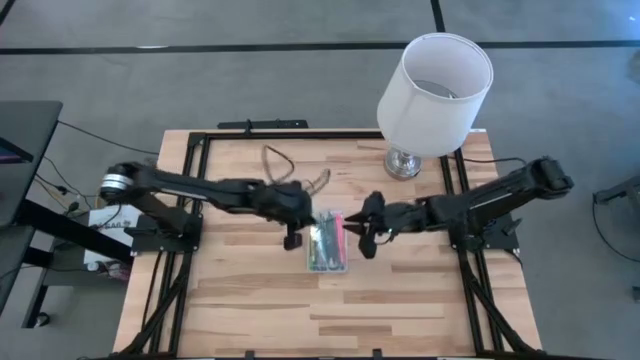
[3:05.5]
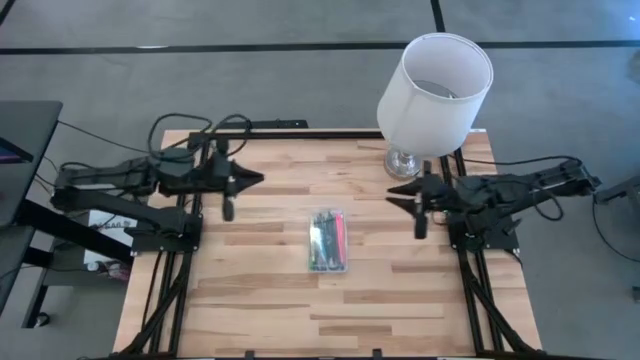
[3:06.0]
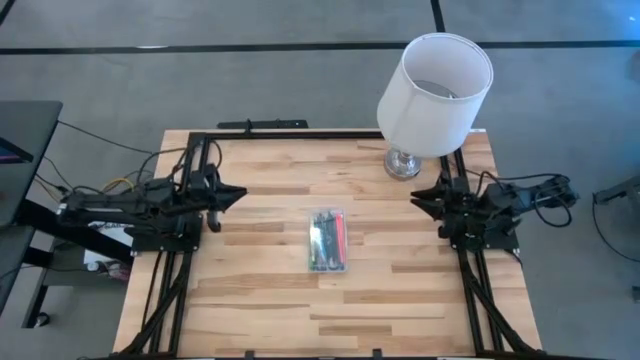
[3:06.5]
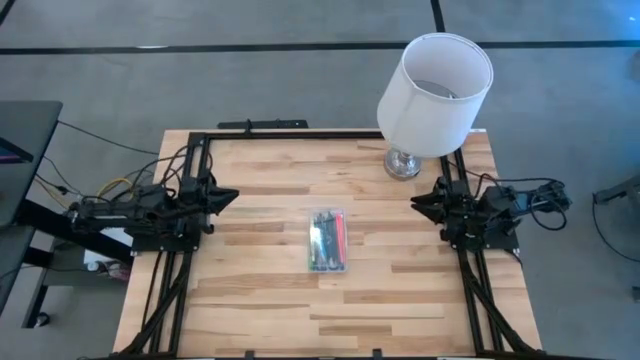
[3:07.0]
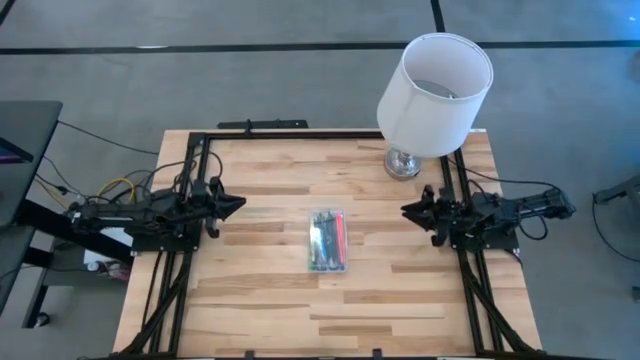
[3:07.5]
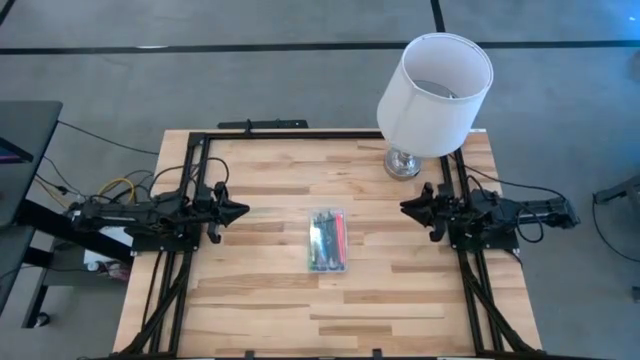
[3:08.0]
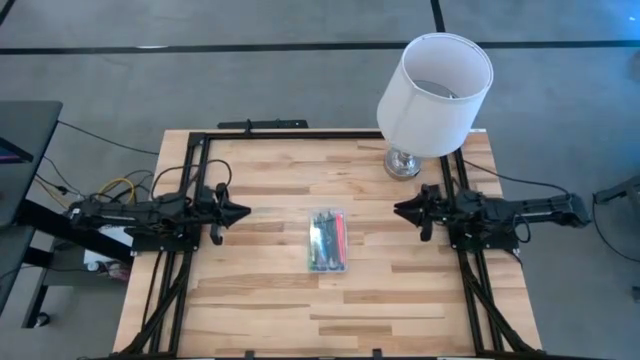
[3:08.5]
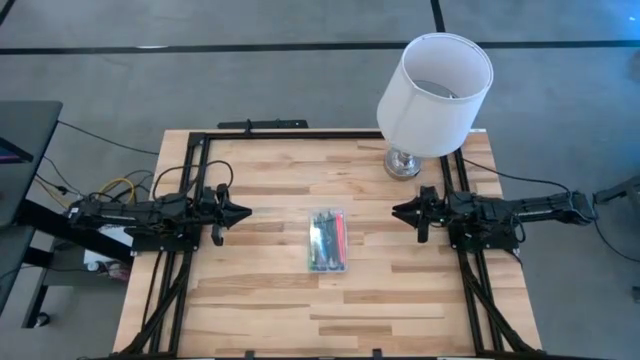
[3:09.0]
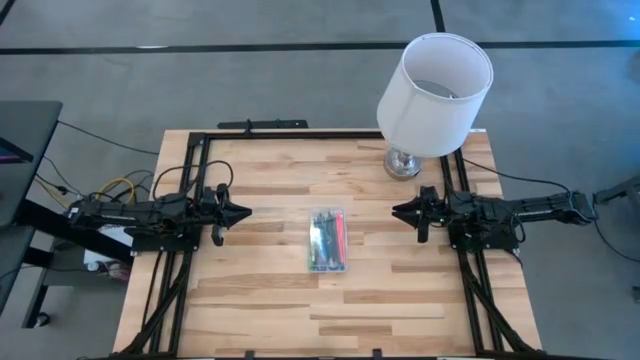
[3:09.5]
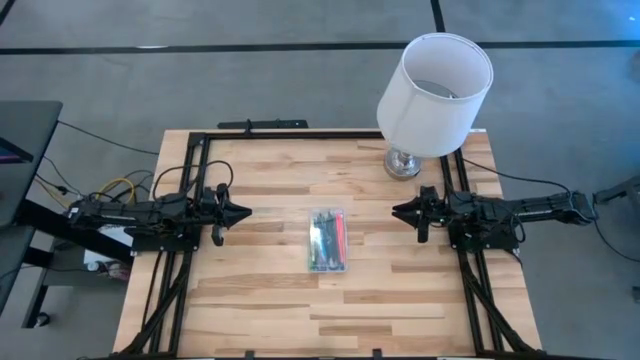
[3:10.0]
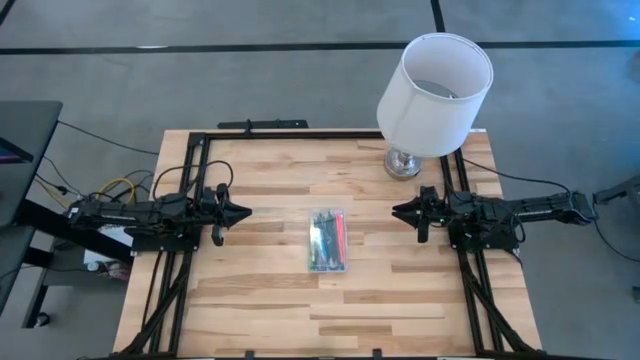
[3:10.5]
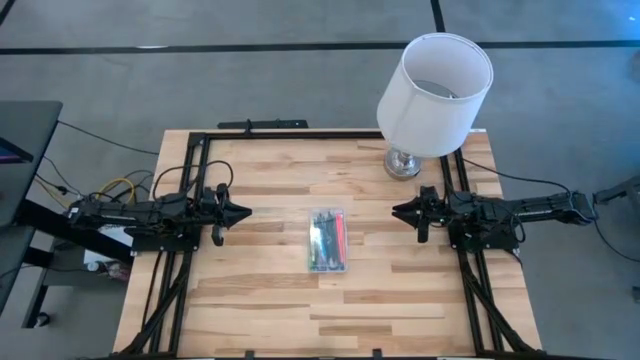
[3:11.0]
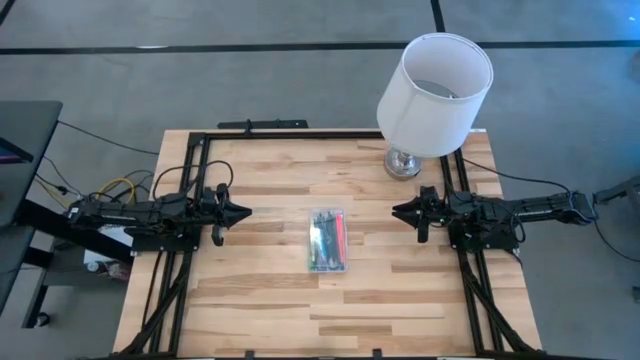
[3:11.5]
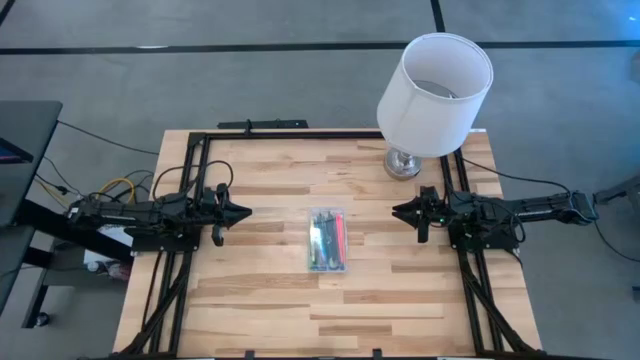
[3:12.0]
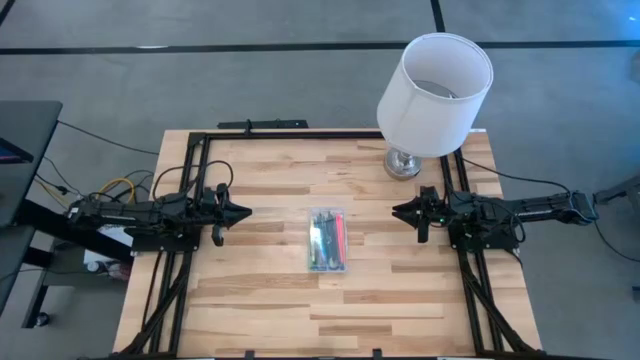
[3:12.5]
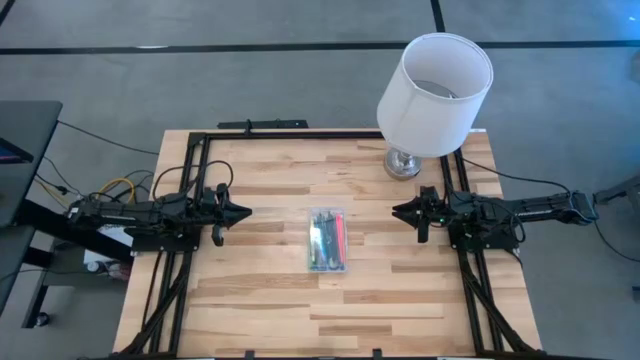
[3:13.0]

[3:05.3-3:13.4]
Task: Pick & place school supplies into a supply box
Return to Home Position

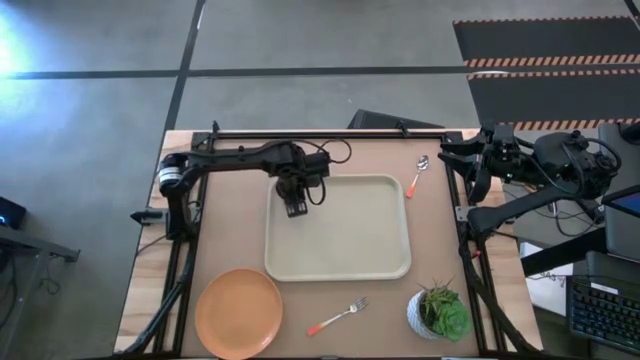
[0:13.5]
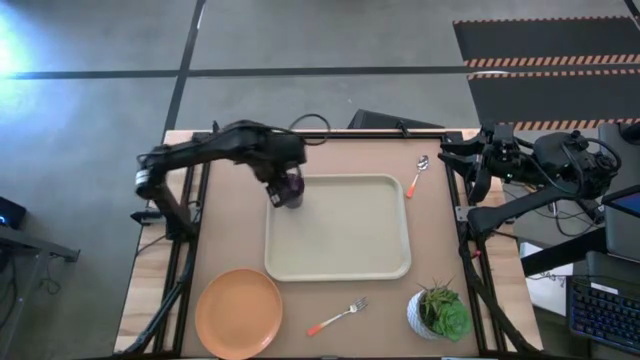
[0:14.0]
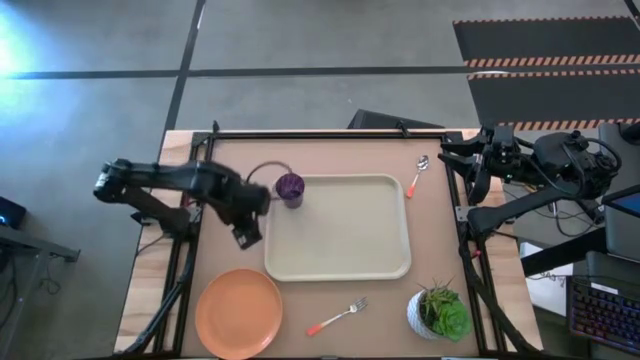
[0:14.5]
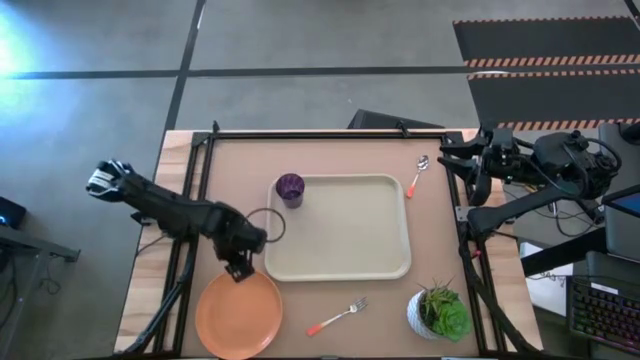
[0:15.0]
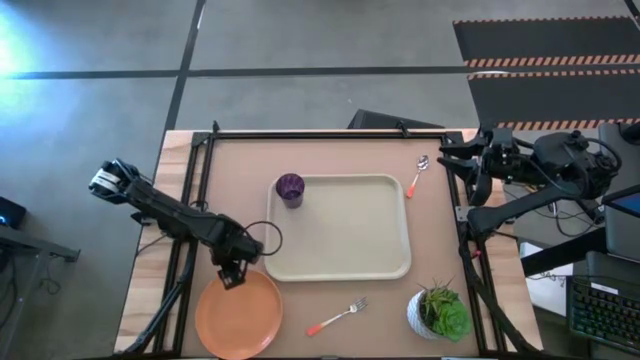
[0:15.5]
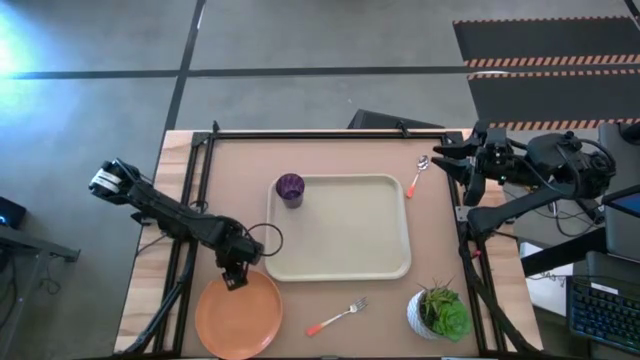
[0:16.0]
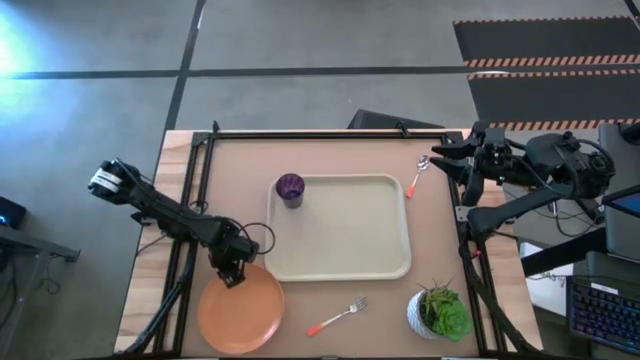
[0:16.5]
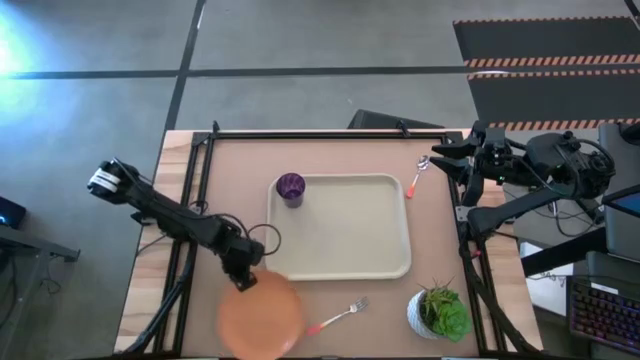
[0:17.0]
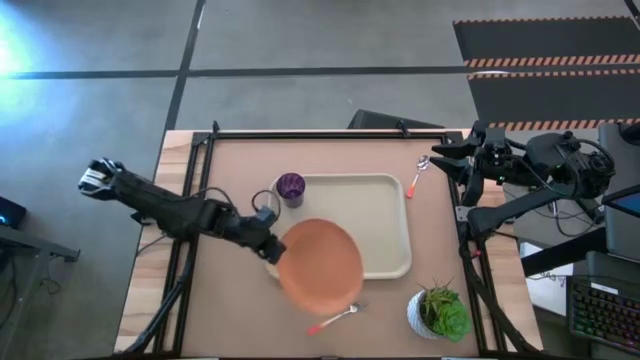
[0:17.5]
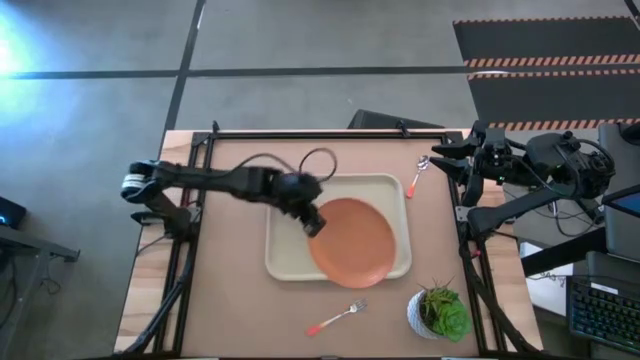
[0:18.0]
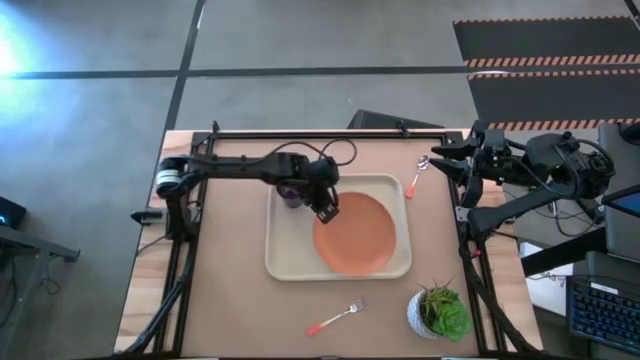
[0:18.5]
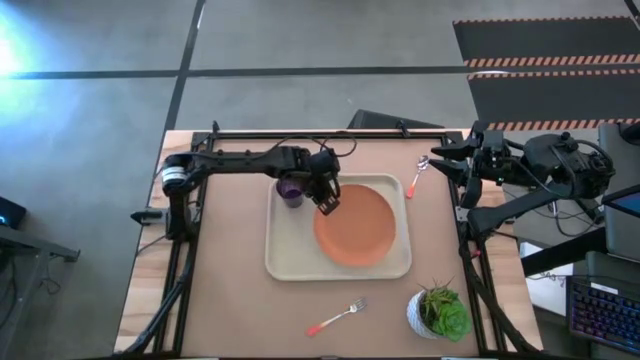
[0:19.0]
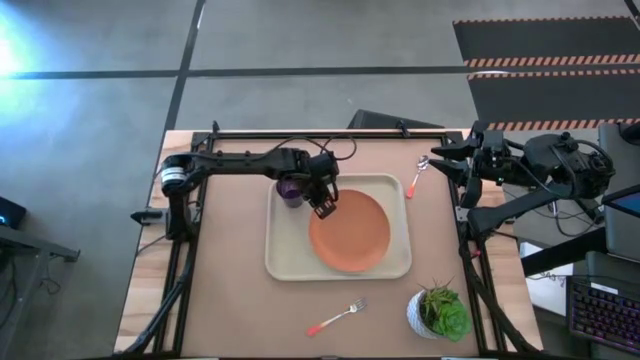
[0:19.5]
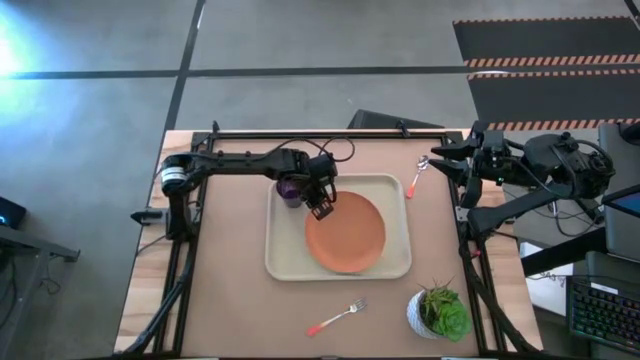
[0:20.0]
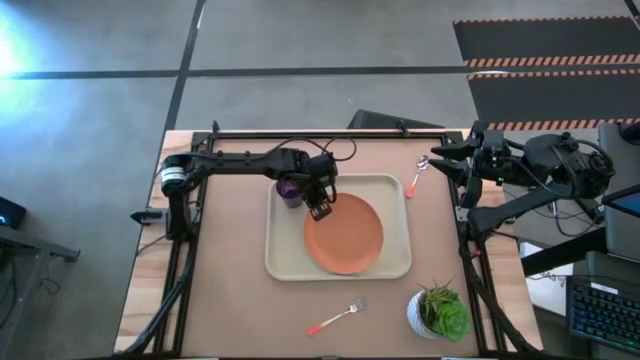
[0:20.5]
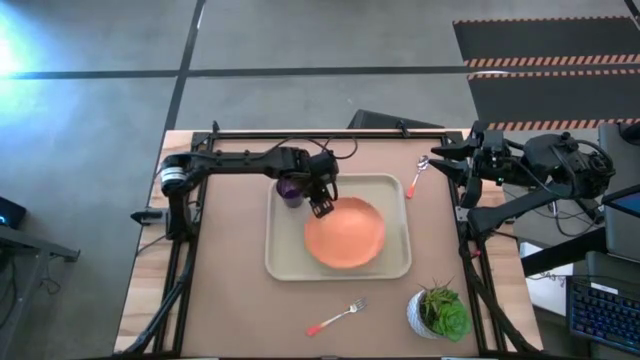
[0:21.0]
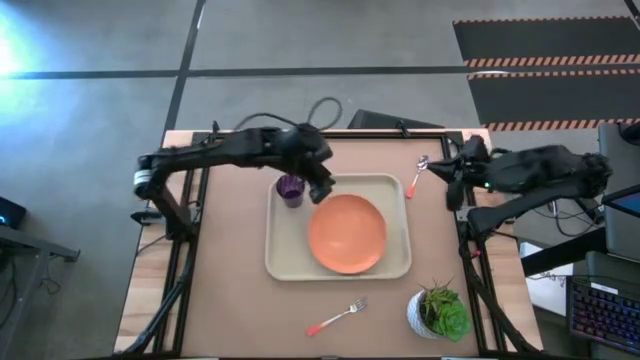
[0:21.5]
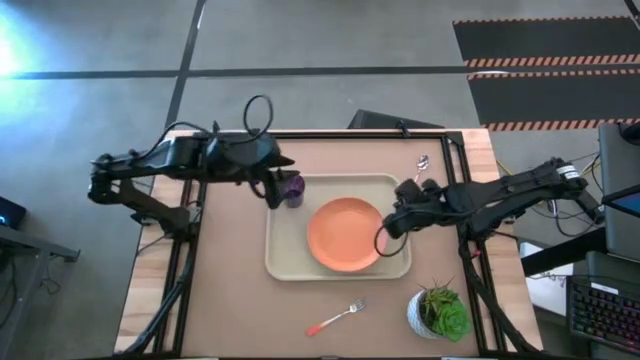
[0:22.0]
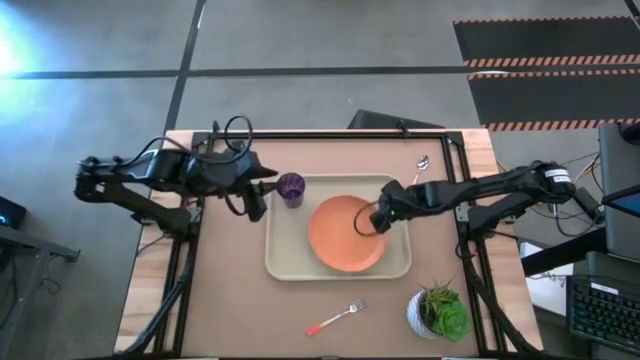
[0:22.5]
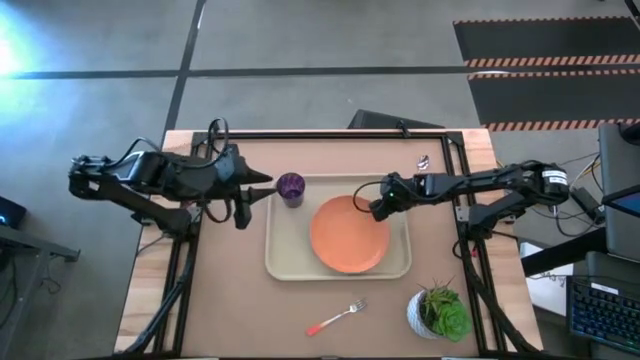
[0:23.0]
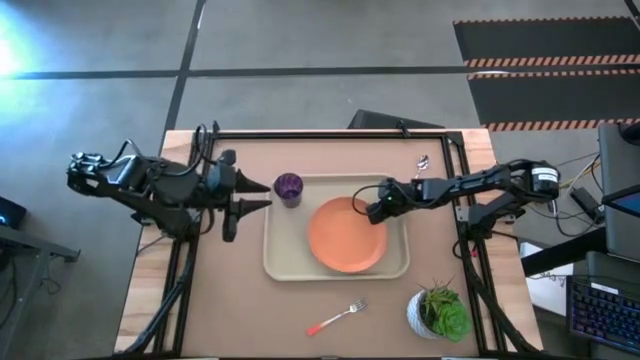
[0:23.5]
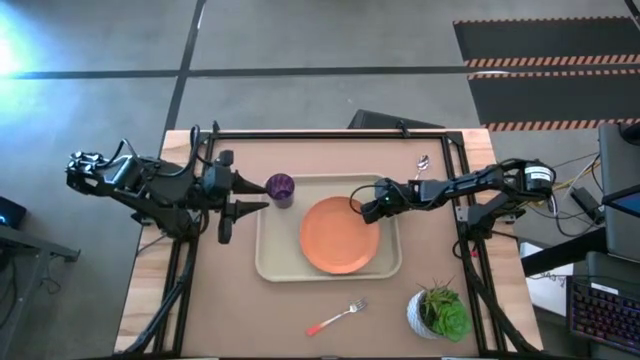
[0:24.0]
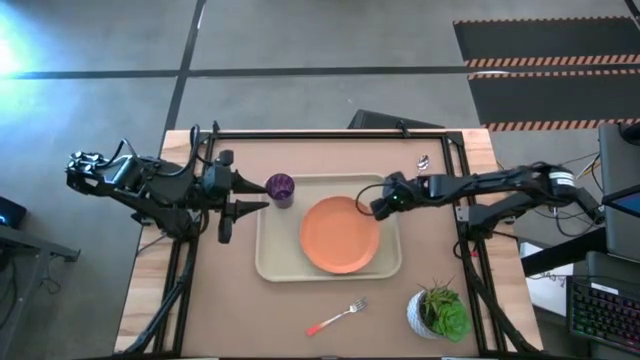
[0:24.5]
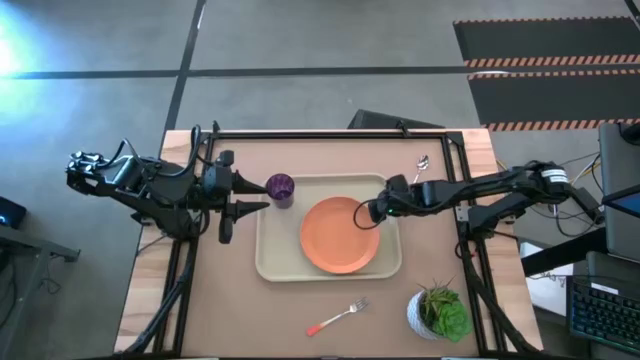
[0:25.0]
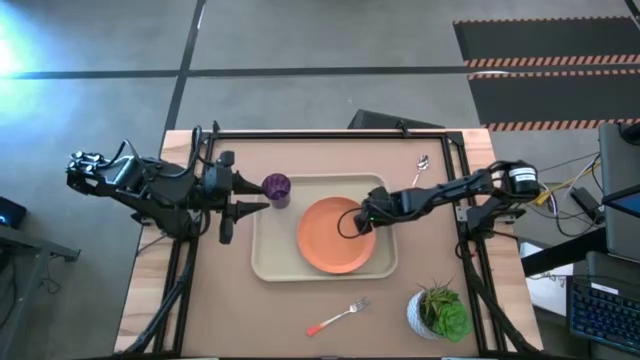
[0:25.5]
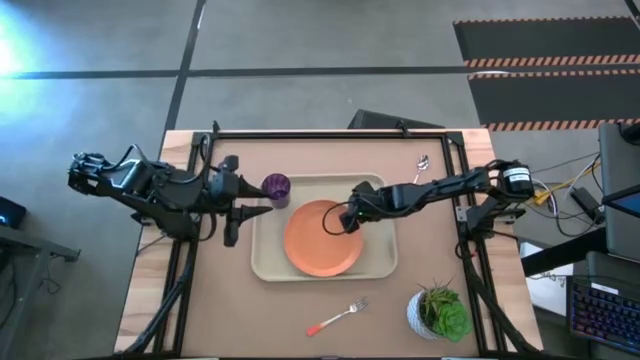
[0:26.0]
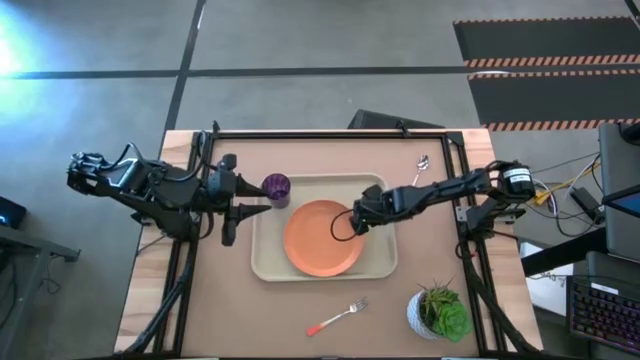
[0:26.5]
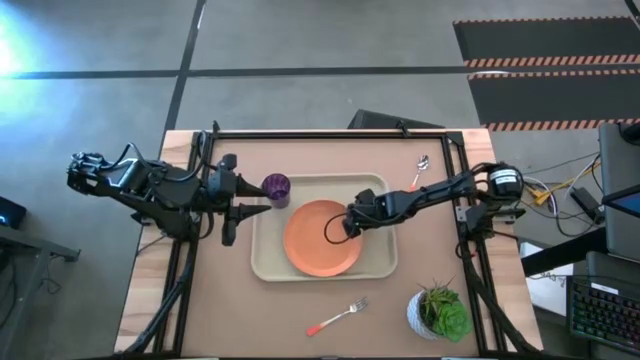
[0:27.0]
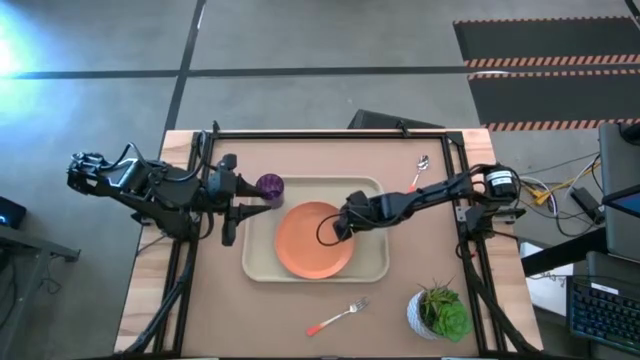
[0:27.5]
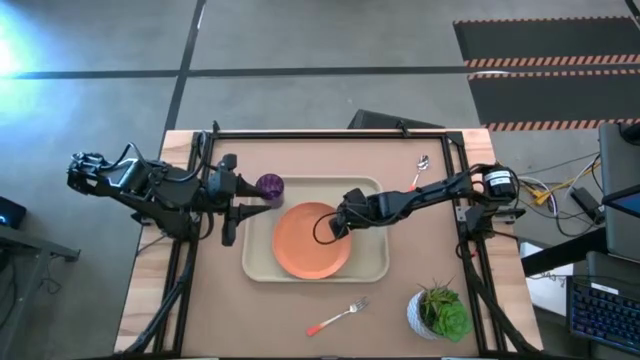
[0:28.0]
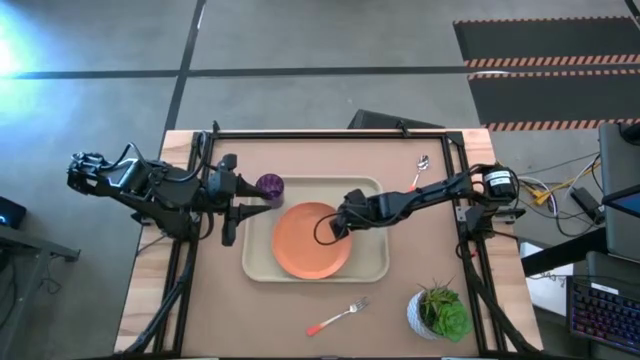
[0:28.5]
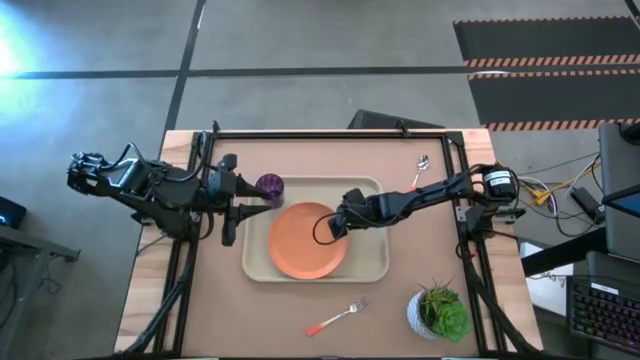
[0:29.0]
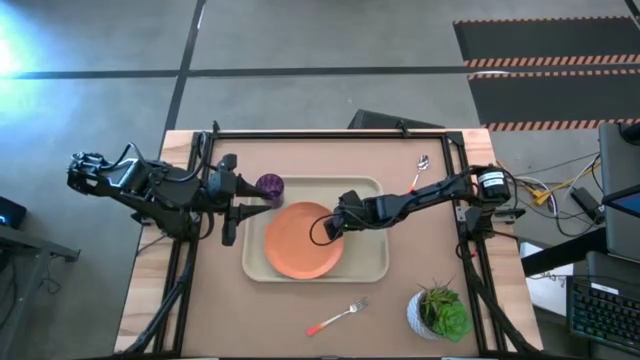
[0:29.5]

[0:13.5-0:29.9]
Task: Pick and place plate/cup/fork/spoon on tray
Put the orange plate on the beige tray
